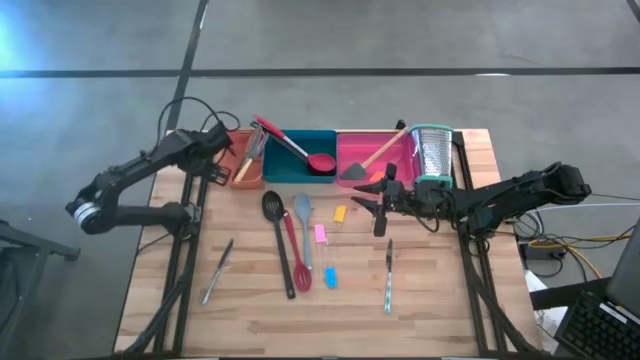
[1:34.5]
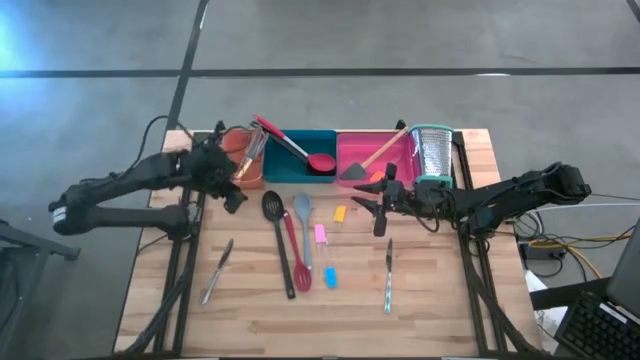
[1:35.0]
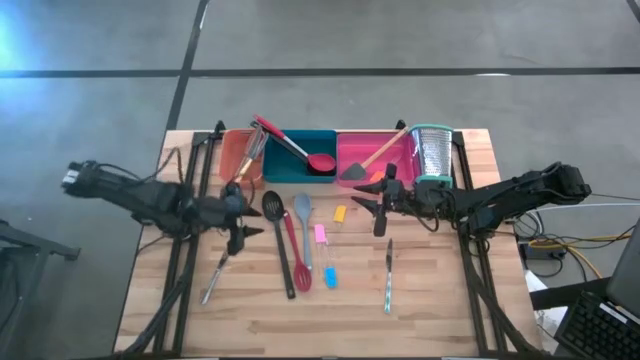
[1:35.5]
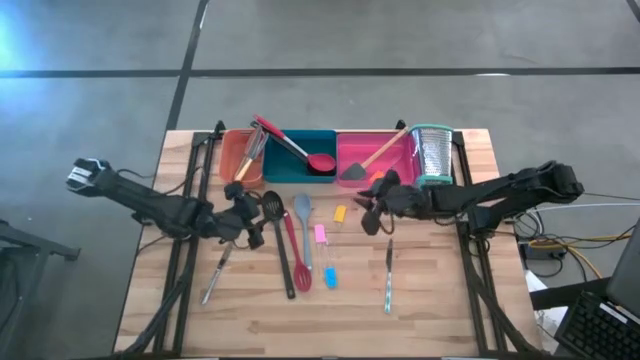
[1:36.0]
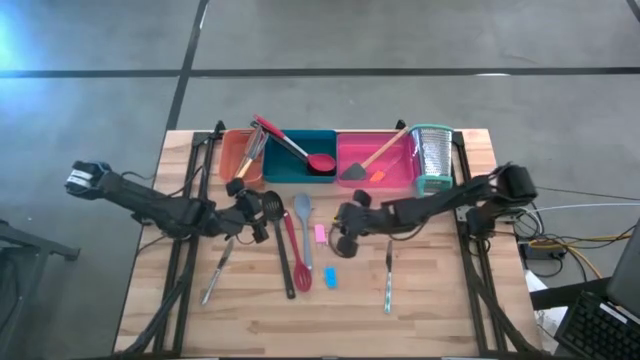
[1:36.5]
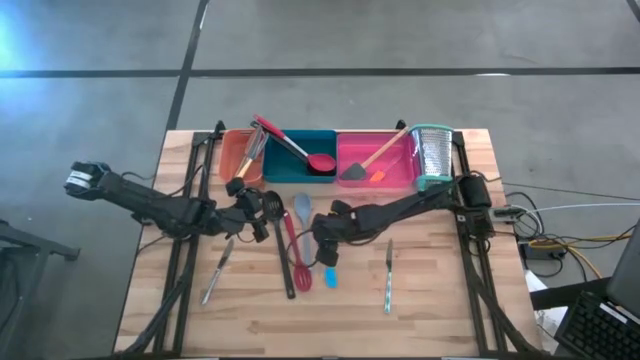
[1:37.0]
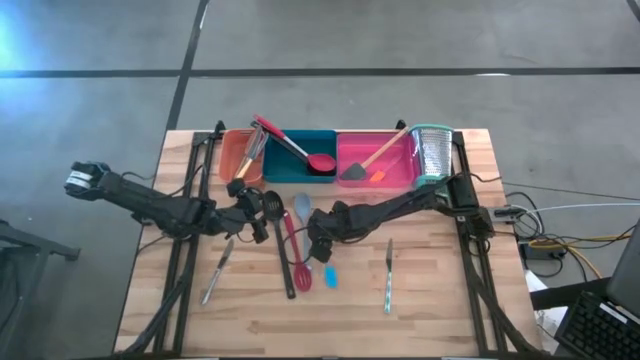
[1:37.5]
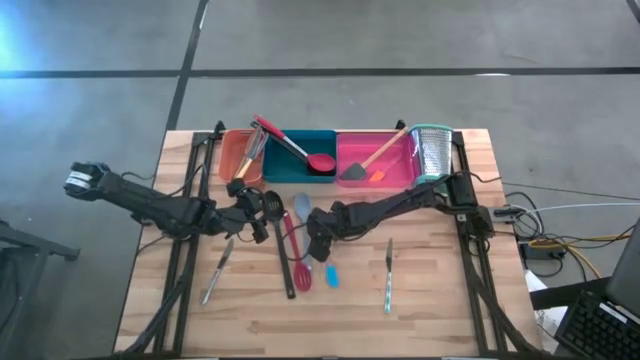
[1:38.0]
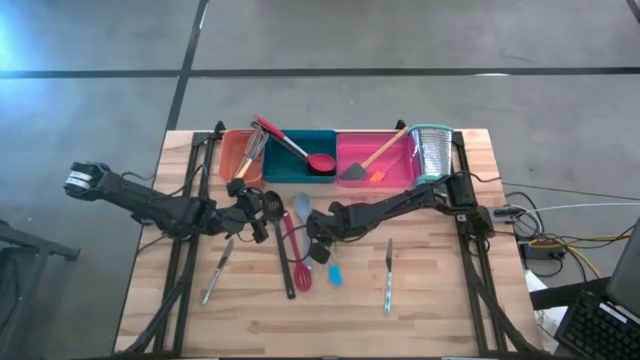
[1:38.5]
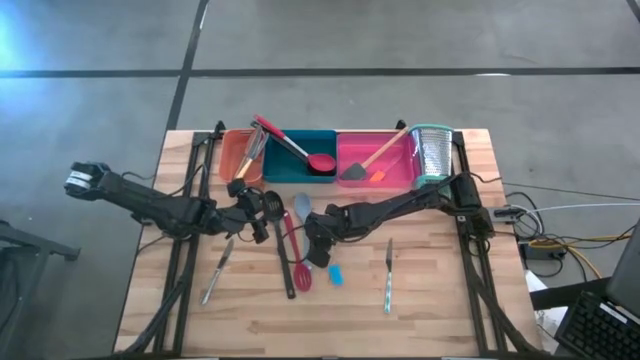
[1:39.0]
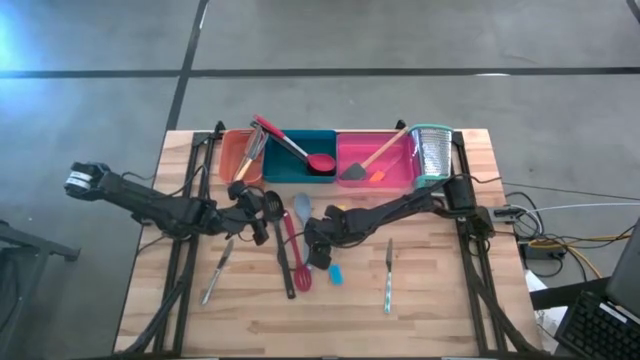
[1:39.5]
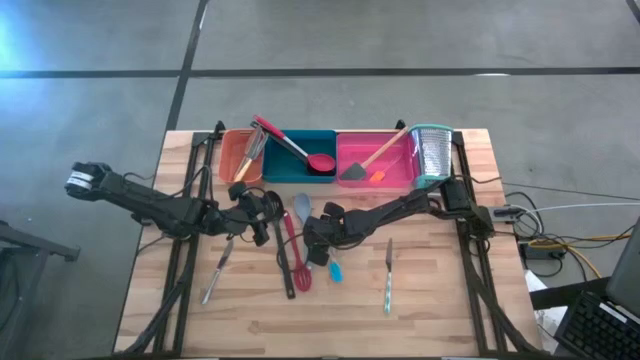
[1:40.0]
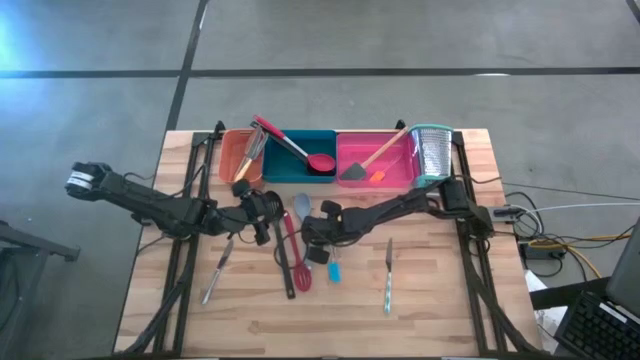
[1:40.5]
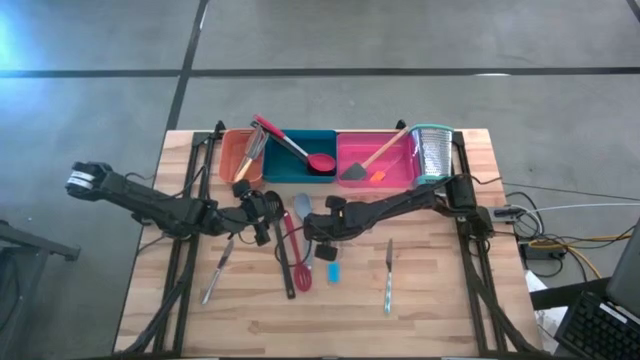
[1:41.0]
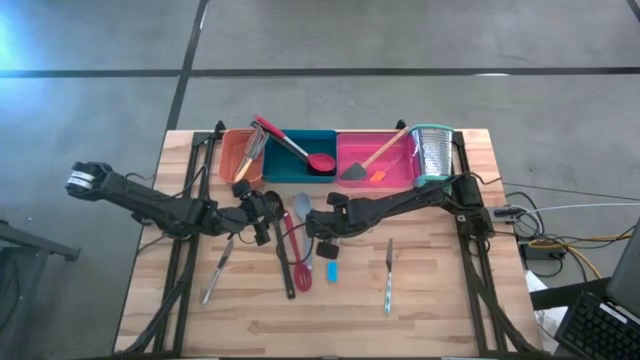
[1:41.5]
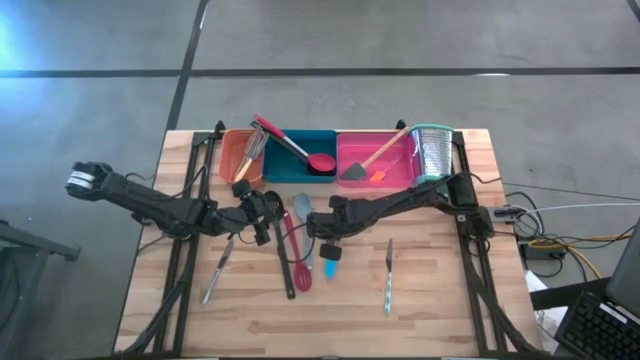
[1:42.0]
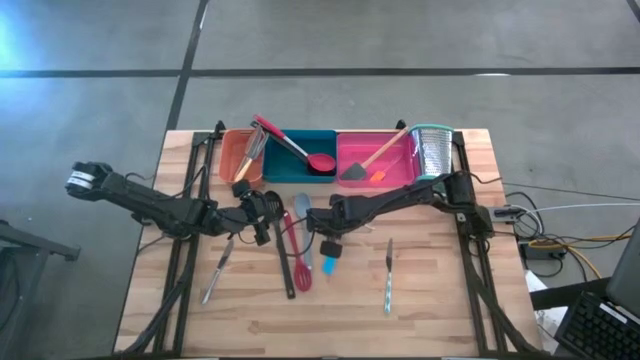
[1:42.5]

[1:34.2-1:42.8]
Task: Pick & Place Kitchen Items
Put the pink spatula into the red bin

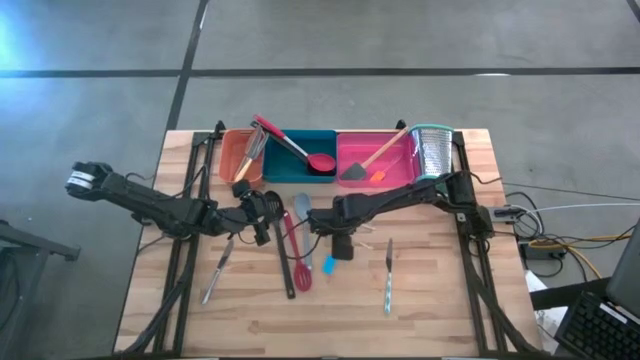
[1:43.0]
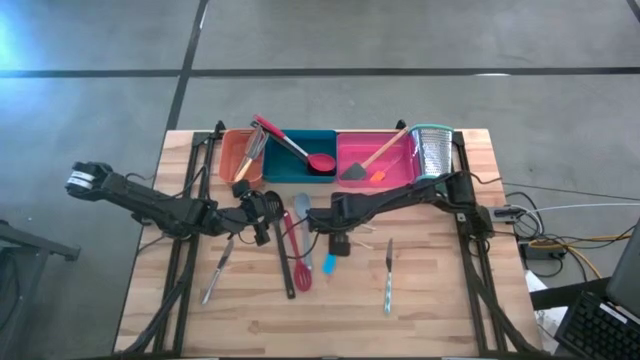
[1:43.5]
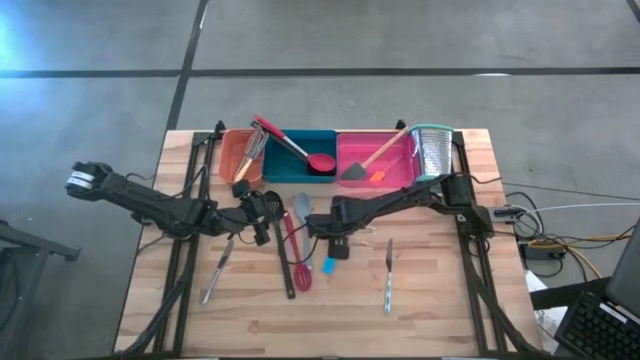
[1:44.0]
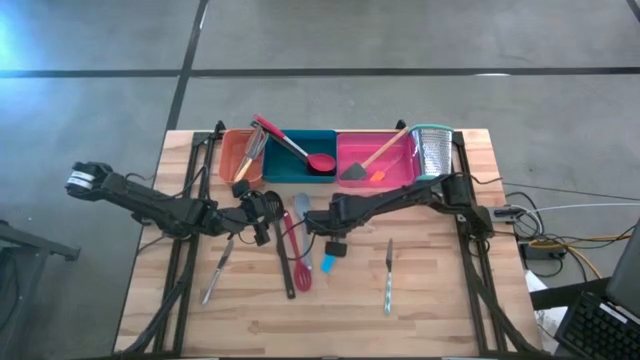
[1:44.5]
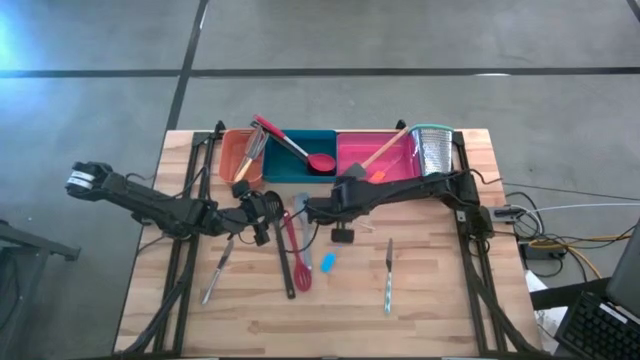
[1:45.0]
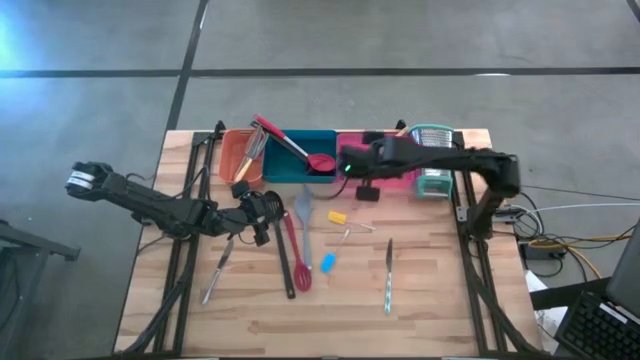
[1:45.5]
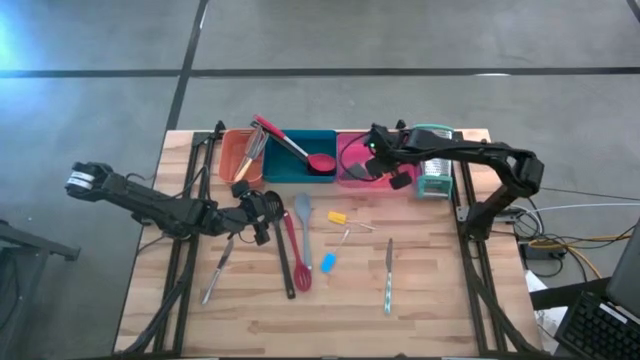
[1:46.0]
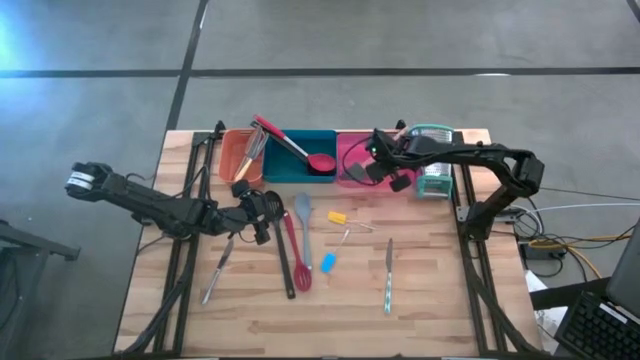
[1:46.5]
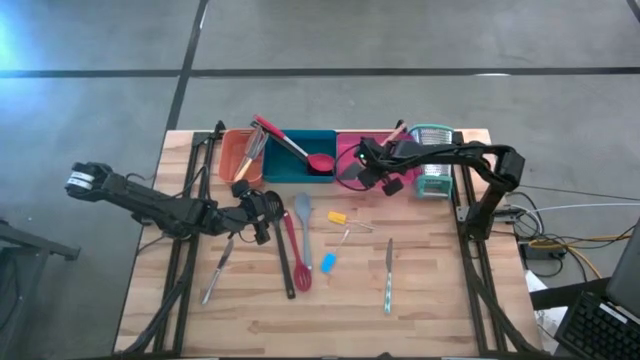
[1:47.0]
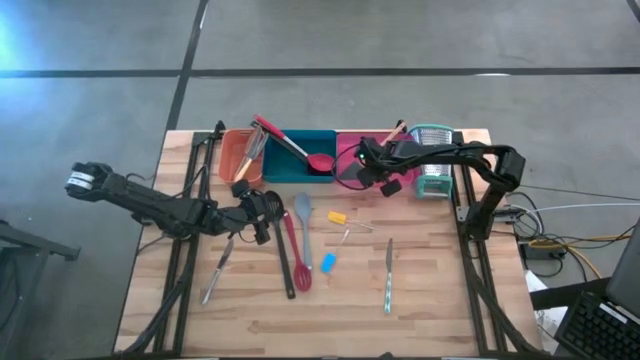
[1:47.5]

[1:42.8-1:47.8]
Put the pink spatula into the red bin

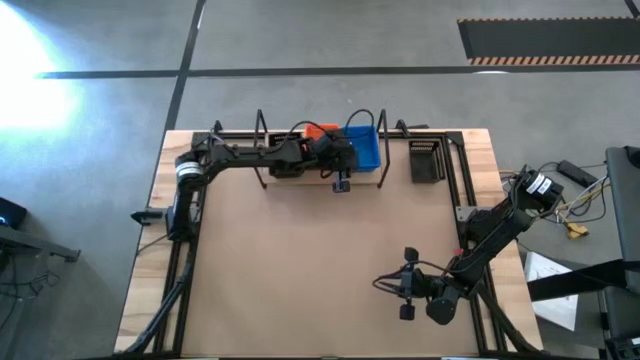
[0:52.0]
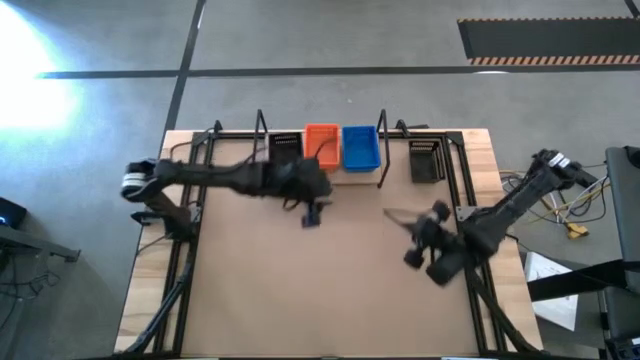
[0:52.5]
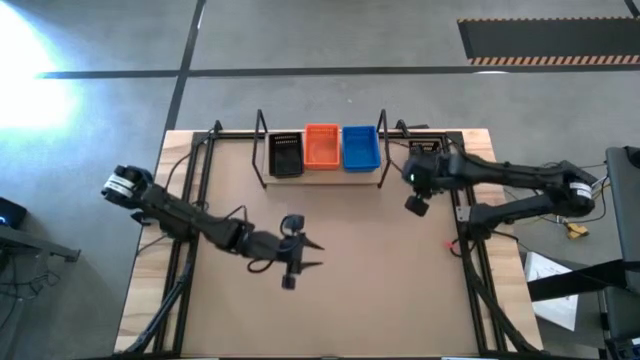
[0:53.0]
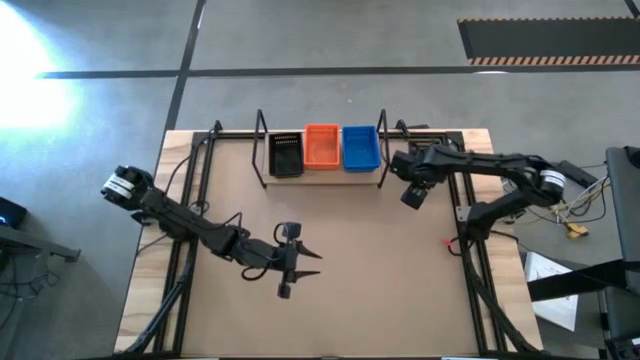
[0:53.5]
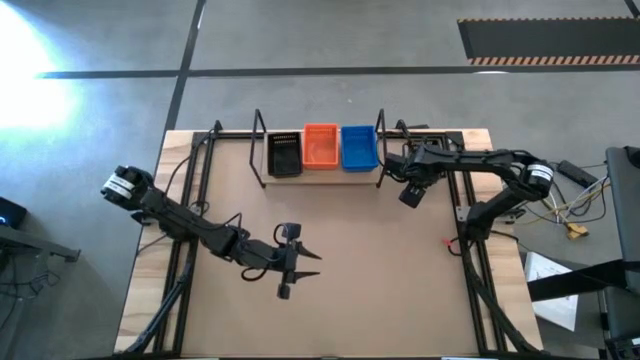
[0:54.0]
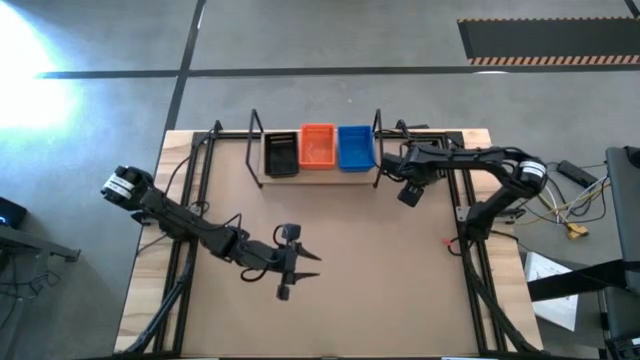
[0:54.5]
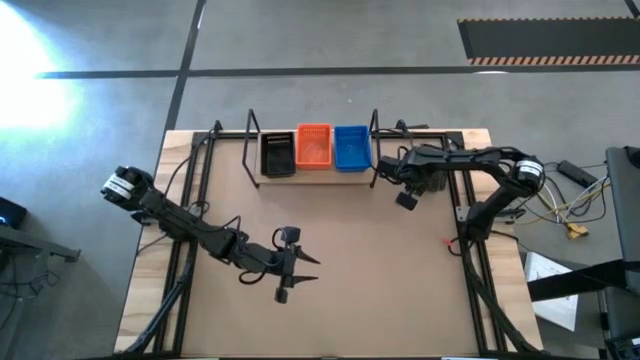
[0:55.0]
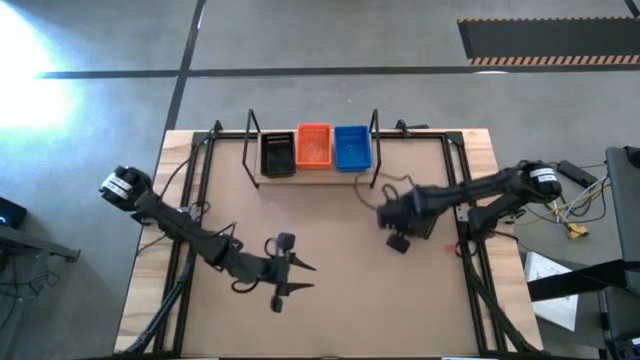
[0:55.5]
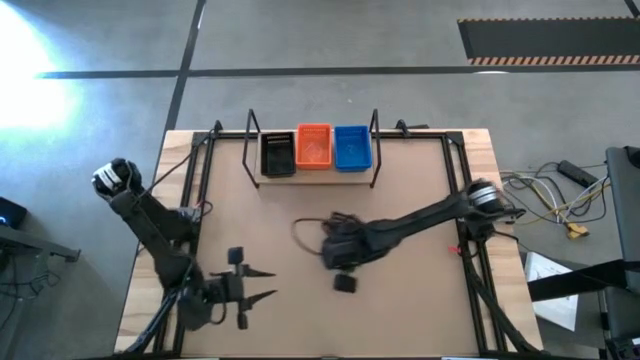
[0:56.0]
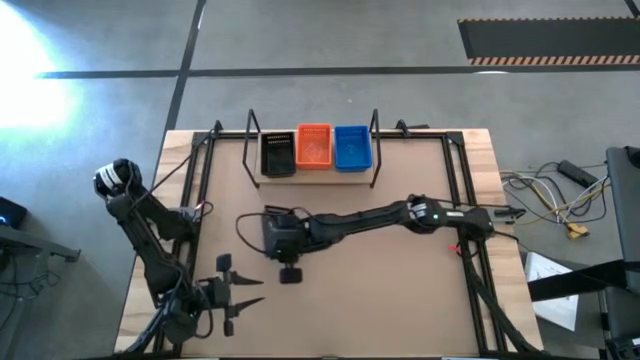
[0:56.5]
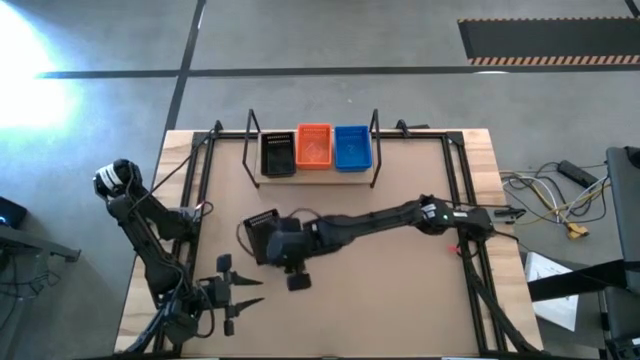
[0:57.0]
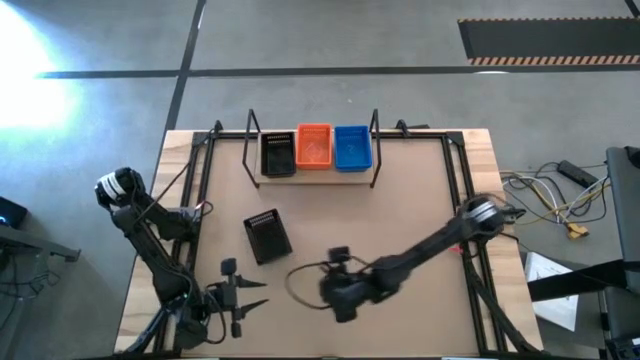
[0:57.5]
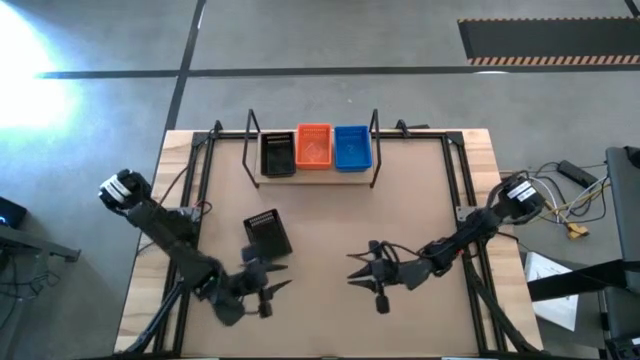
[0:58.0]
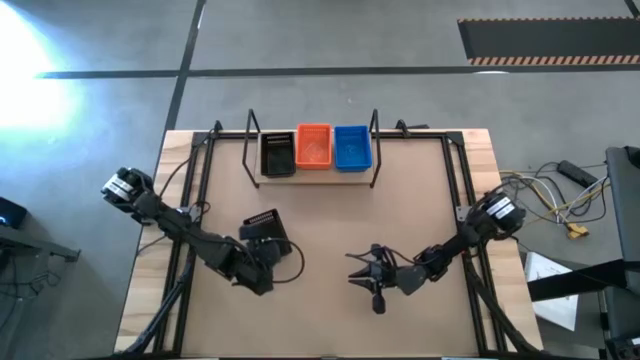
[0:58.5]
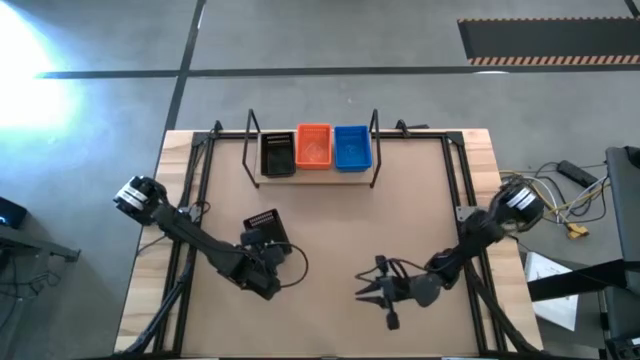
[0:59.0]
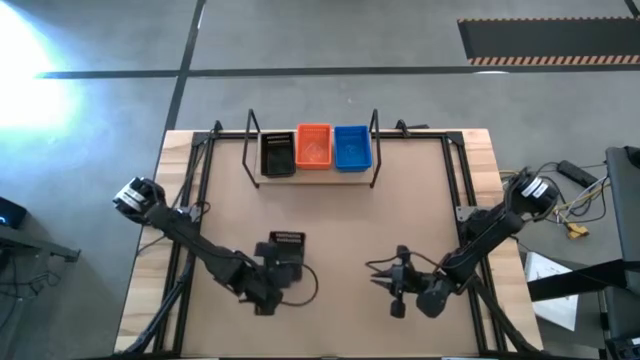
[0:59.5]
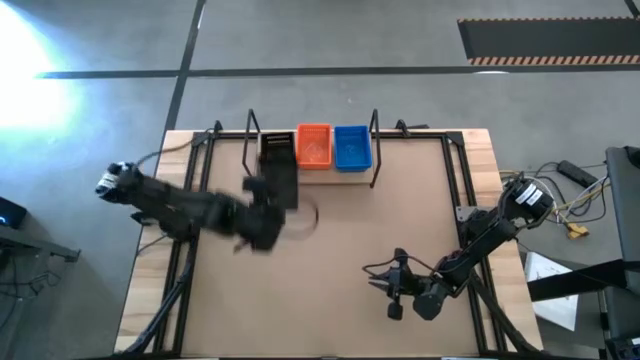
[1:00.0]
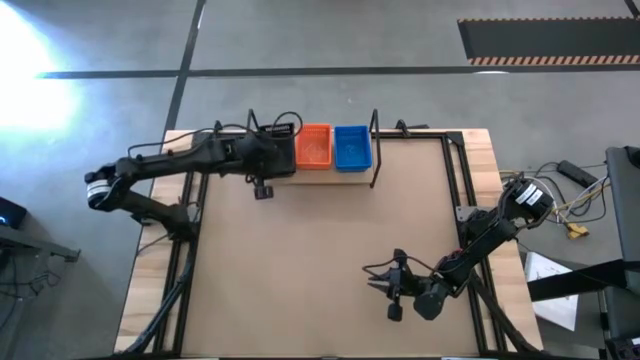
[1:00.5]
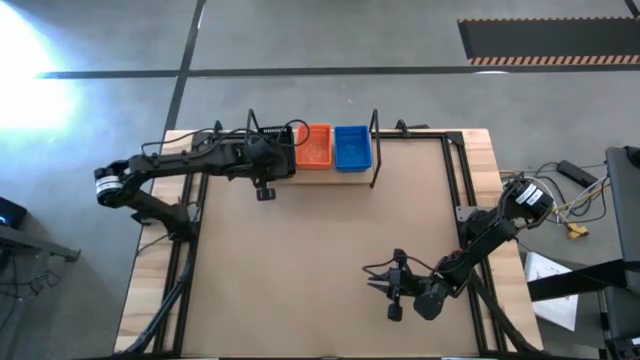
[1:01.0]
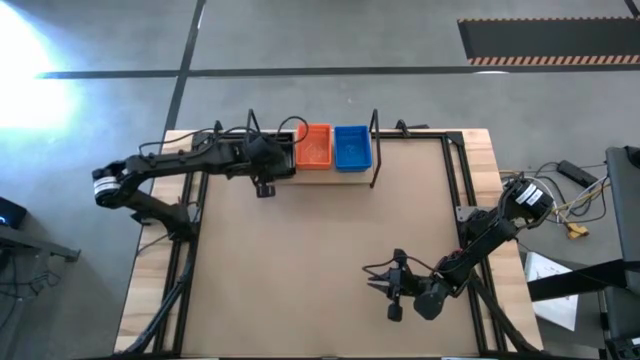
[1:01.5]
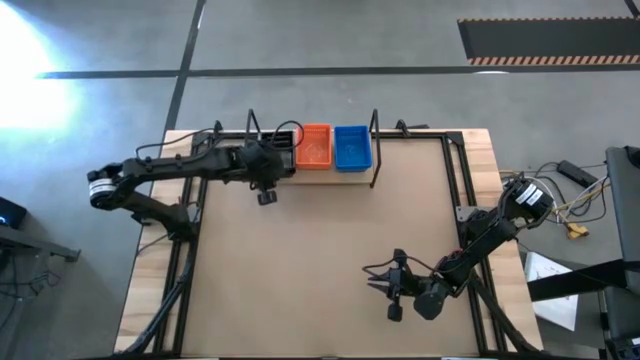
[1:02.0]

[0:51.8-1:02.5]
Task: Stack baskets on shelf by color
Stack the black bin on the black bins on the shelf
